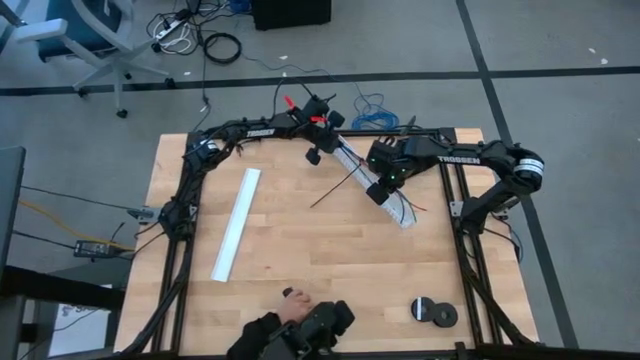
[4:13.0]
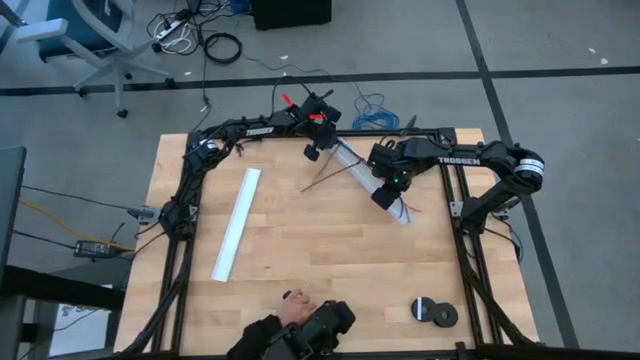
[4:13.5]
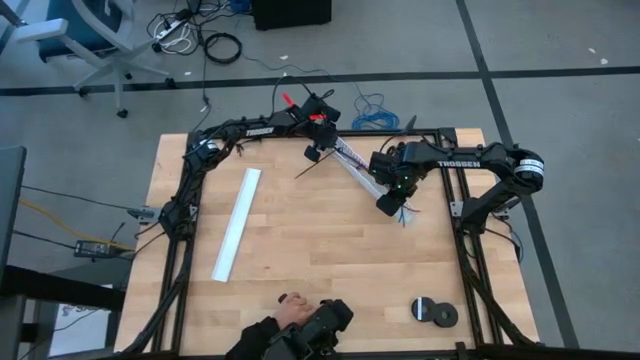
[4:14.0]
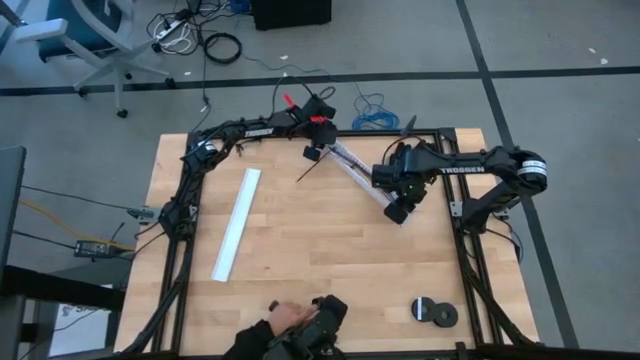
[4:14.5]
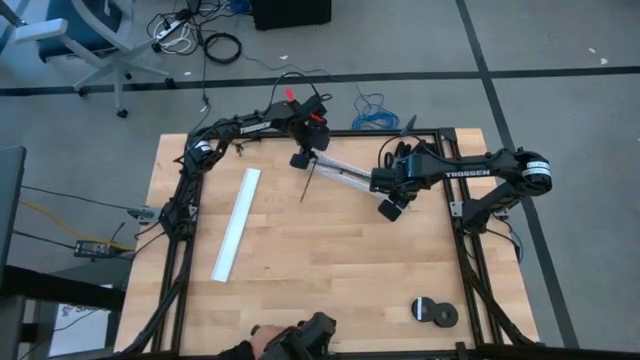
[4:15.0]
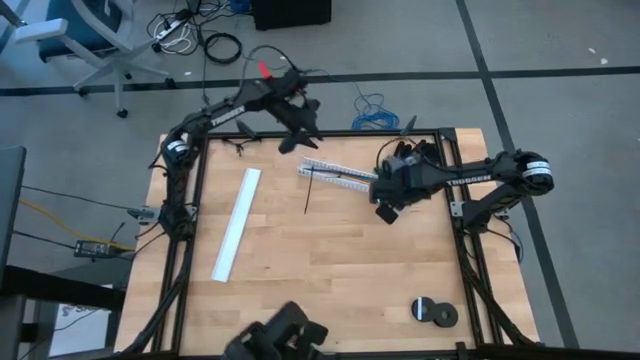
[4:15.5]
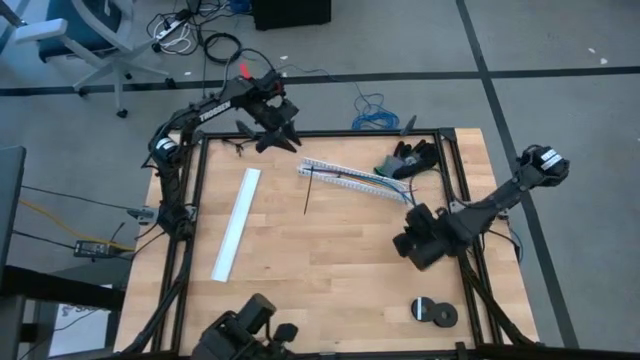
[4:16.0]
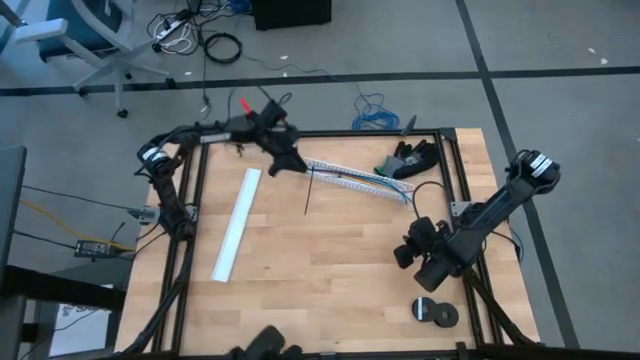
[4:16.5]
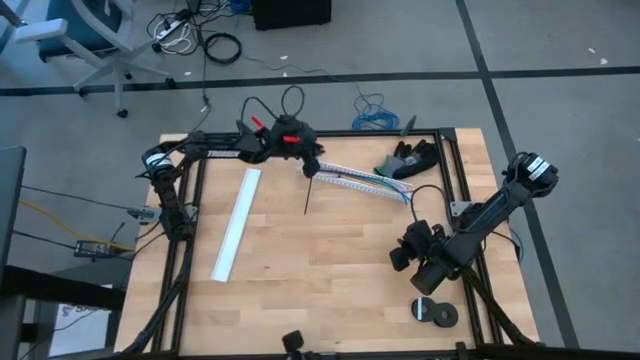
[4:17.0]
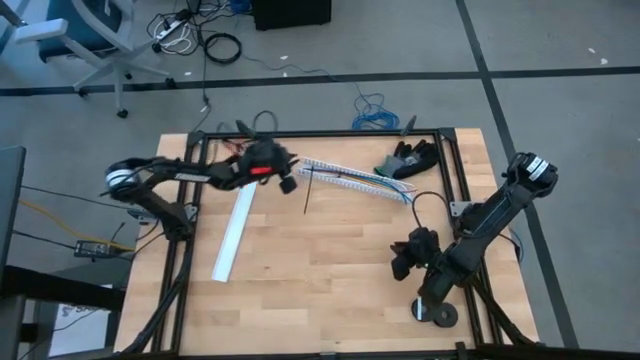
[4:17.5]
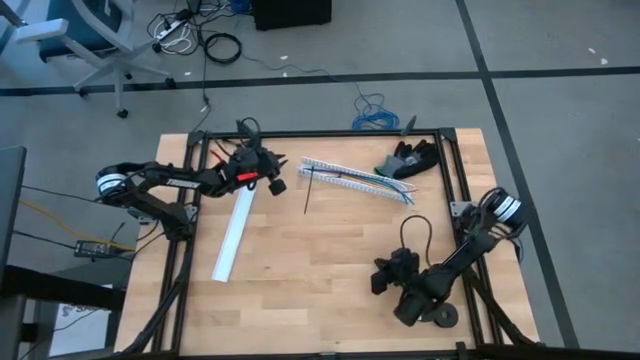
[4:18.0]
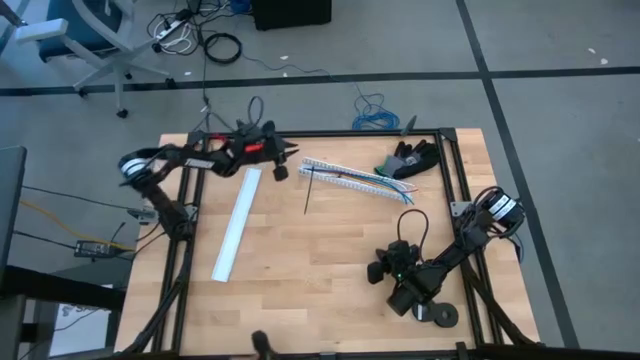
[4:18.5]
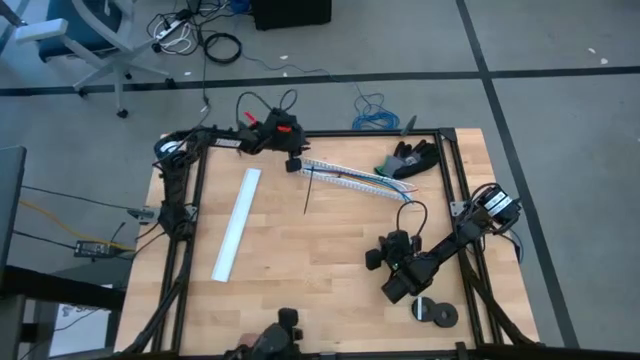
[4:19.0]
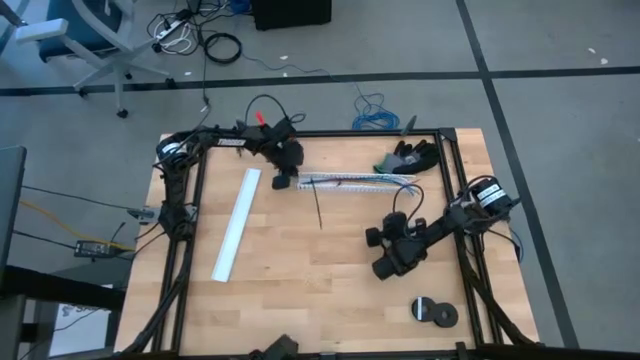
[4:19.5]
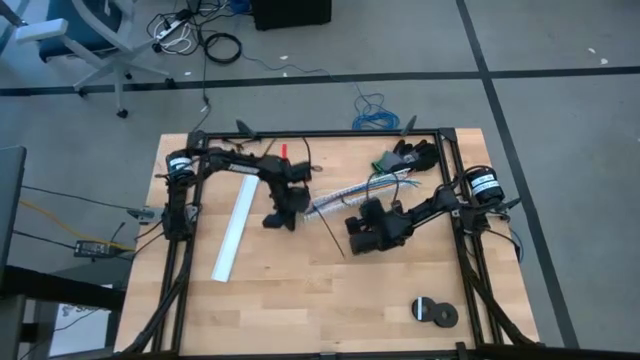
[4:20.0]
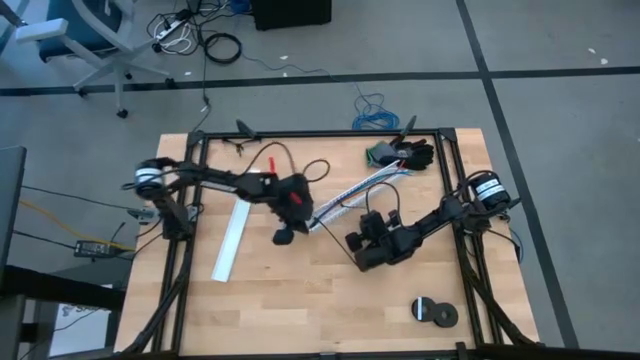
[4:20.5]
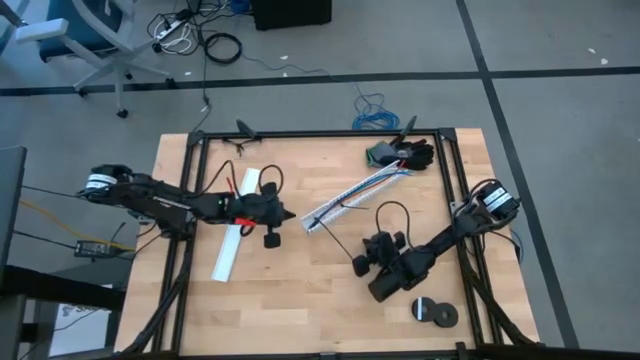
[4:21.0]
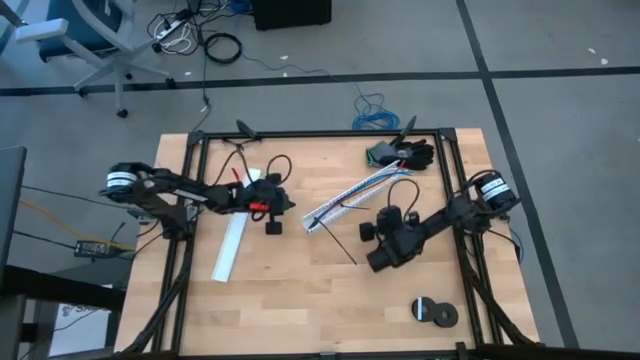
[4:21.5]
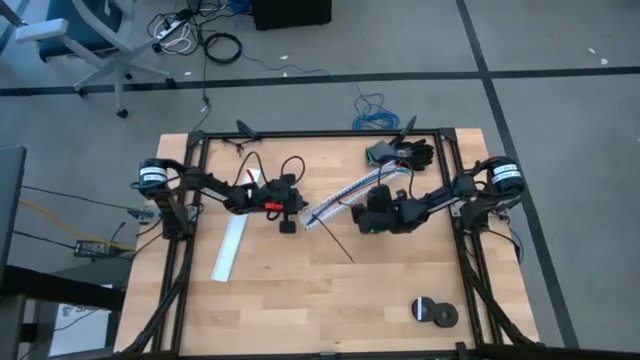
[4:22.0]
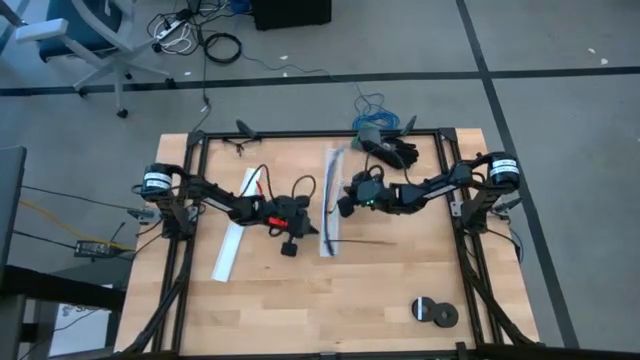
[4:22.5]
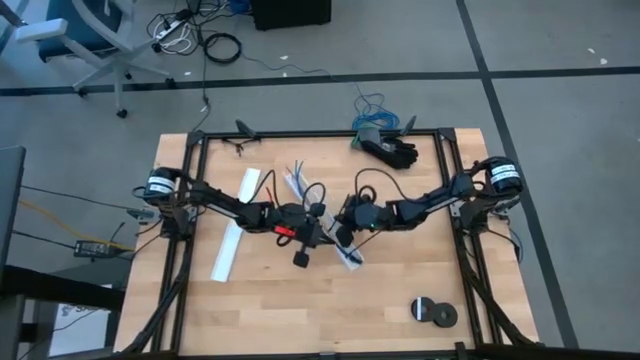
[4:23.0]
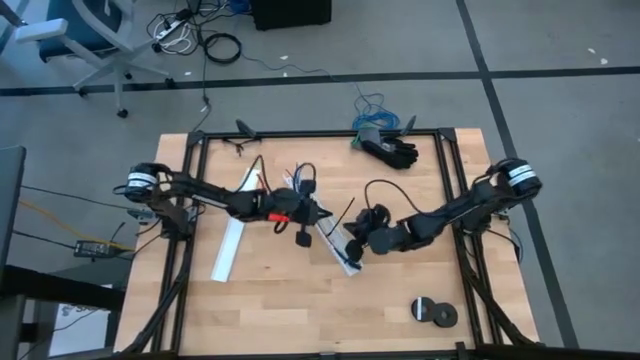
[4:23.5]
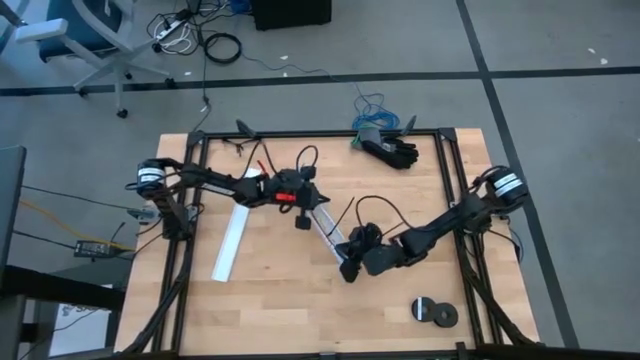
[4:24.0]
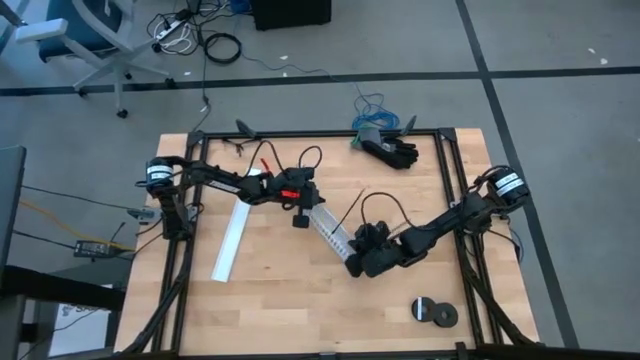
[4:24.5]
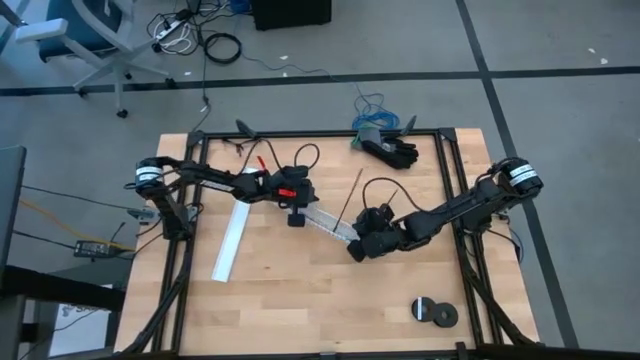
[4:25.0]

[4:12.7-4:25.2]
Task: Ziptie cables
Put the cable wires into the white cable duct

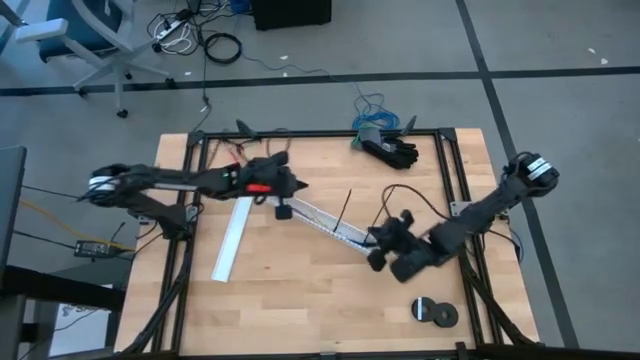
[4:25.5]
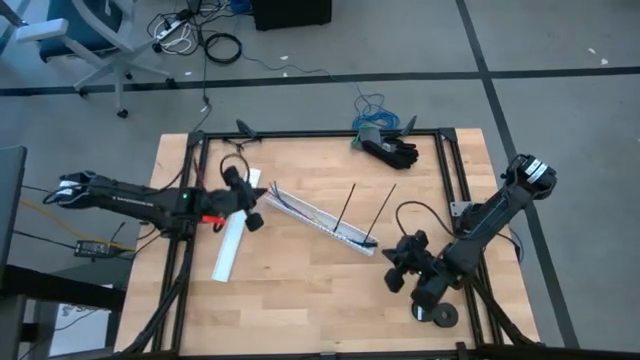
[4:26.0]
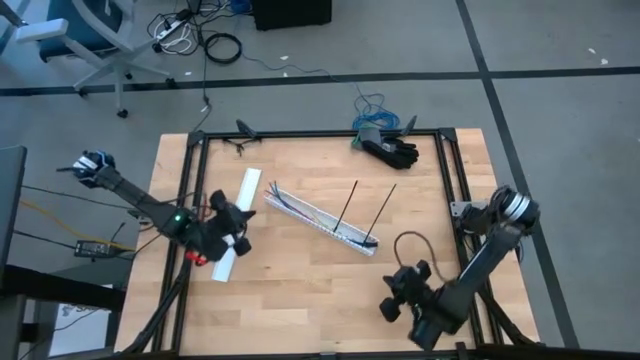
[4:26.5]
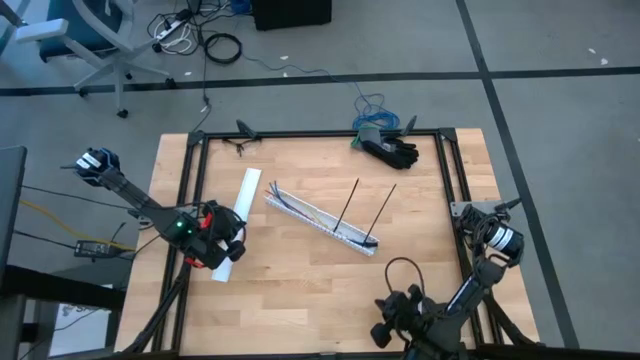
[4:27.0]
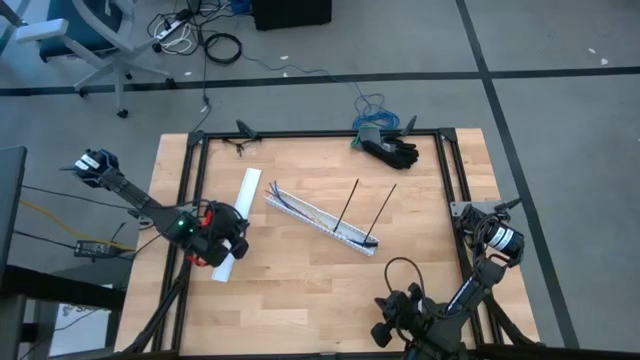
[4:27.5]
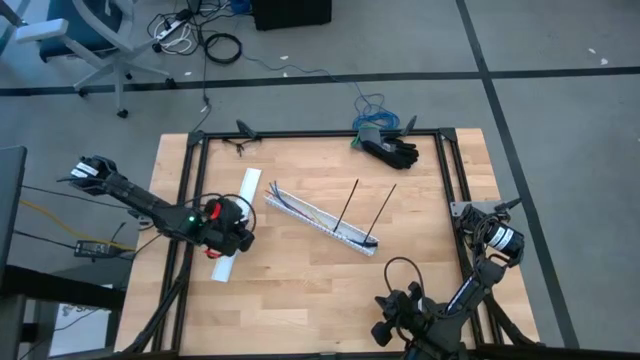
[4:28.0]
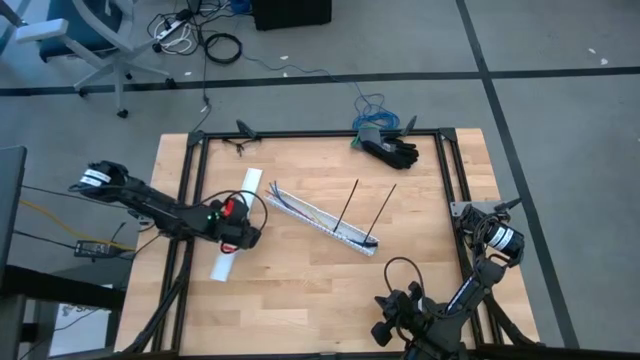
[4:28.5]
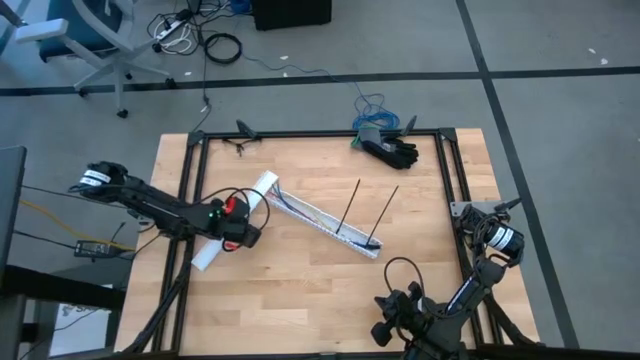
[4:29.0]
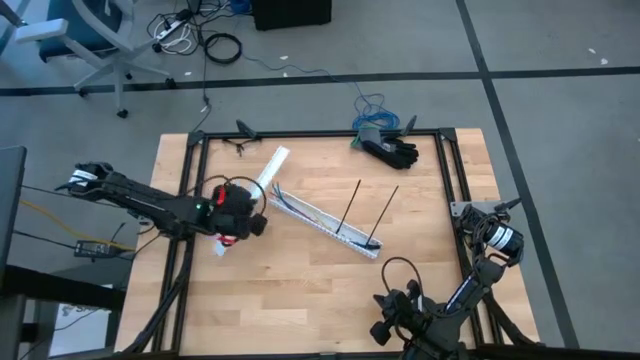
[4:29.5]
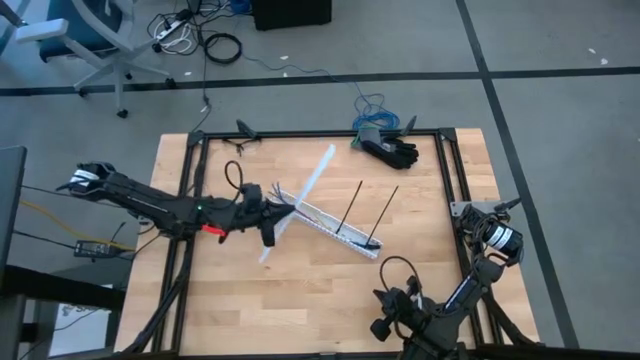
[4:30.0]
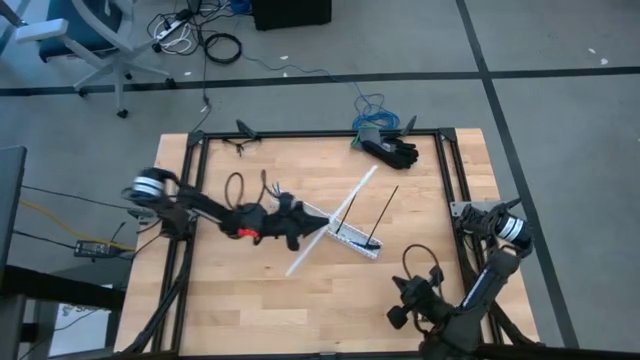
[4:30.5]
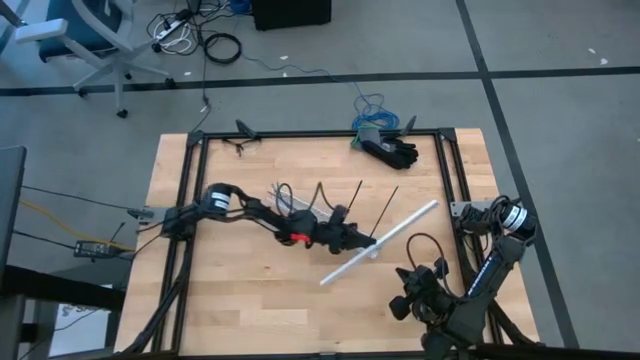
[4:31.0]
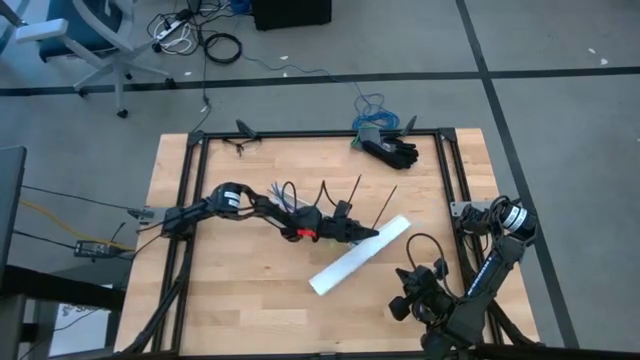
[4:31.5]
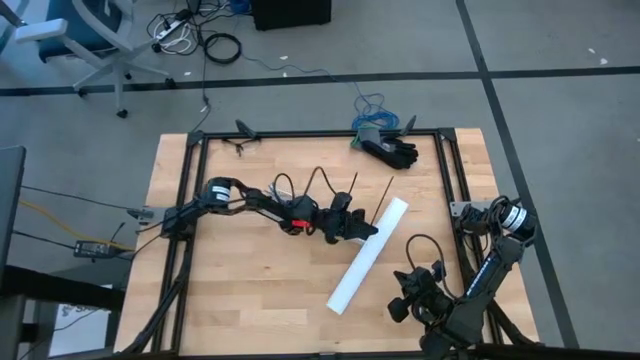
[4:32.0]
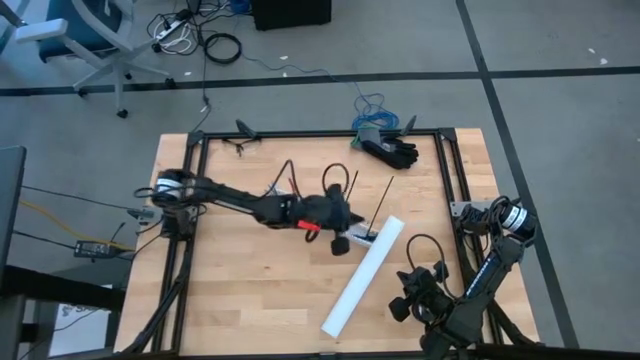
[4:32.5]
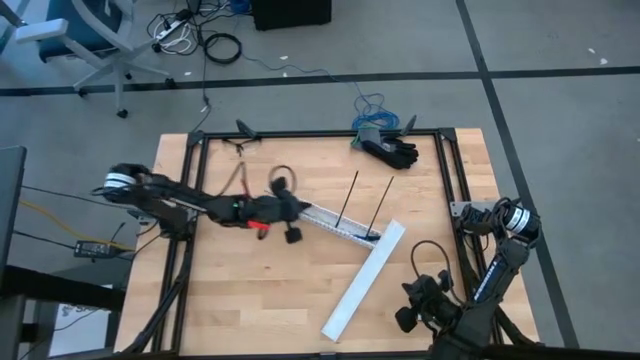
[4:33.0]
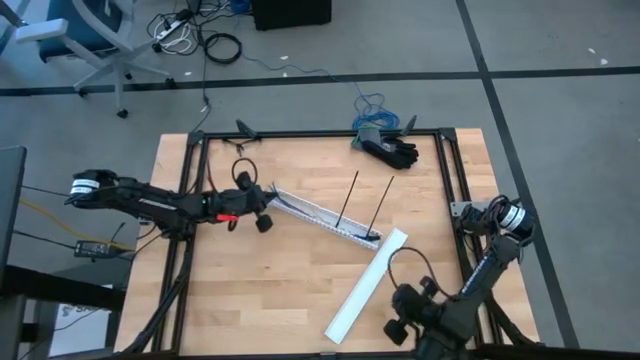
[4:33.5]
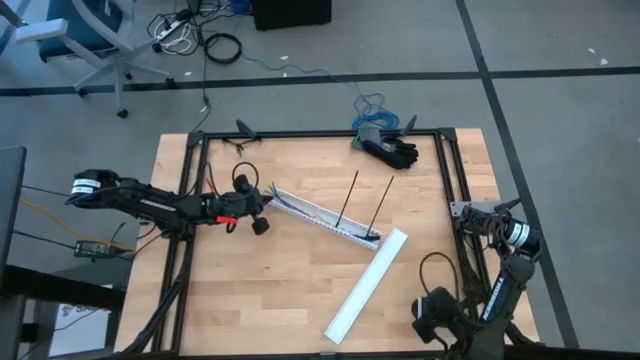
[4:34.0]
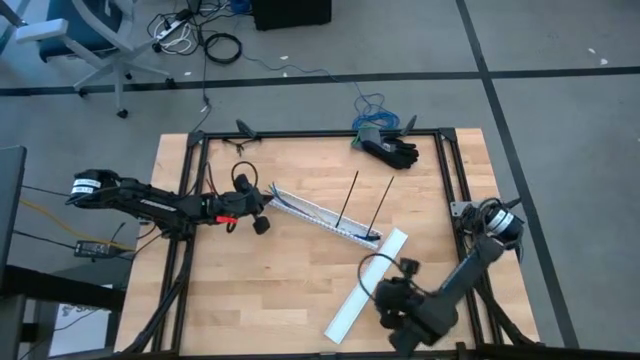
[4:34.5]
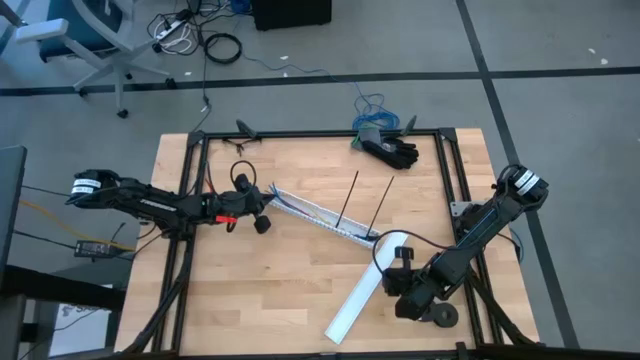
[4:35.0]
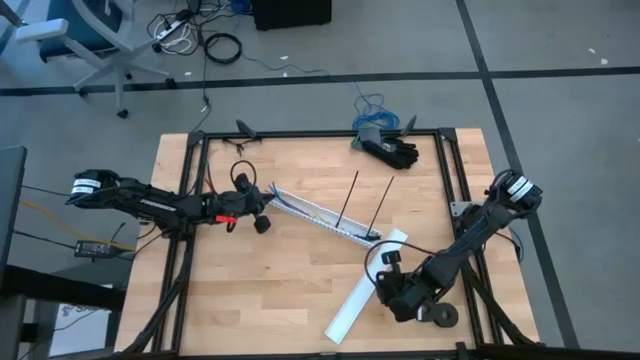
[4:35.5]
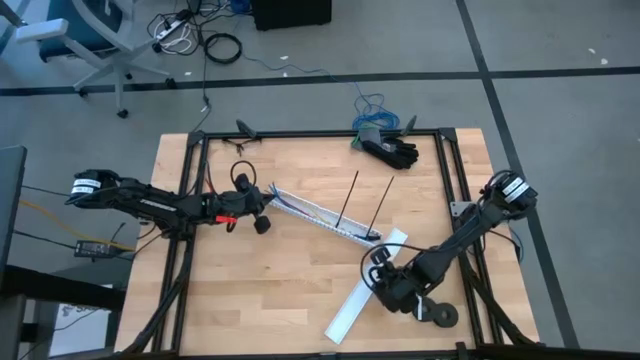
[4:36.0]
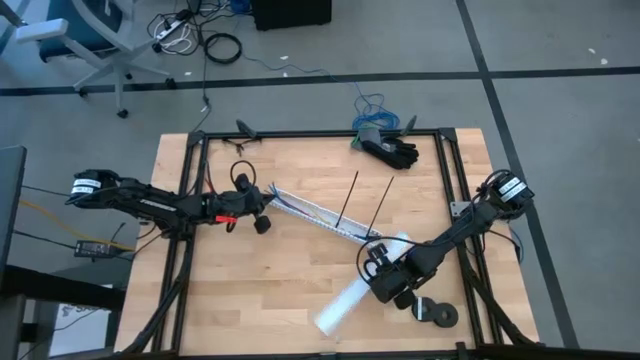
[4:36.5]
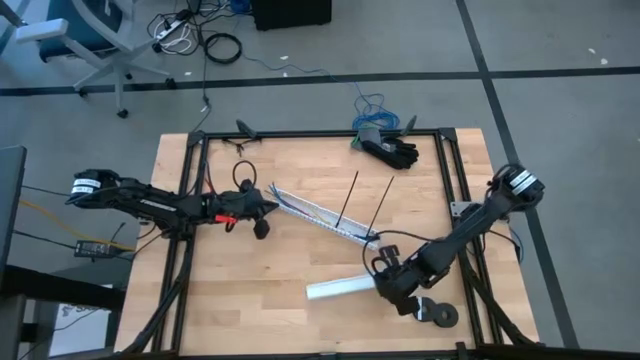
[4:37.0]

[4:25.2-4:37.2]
Close the white cable duct lid
